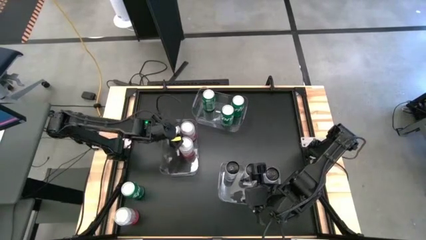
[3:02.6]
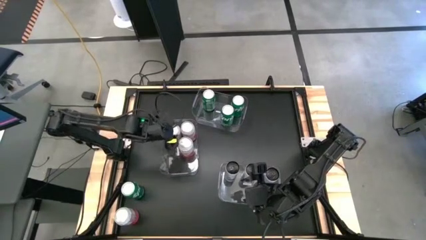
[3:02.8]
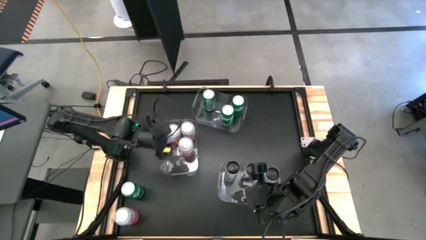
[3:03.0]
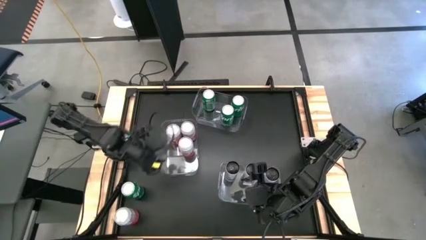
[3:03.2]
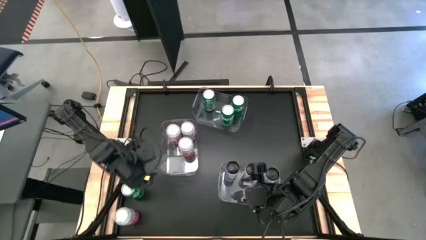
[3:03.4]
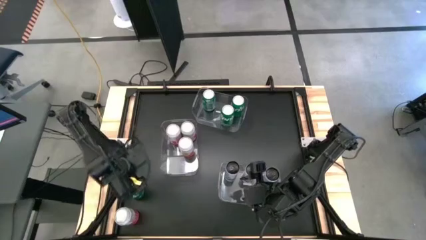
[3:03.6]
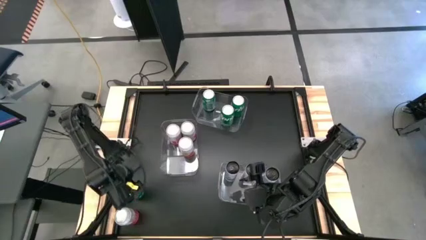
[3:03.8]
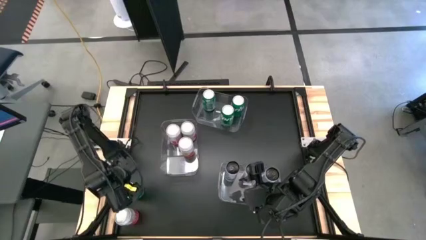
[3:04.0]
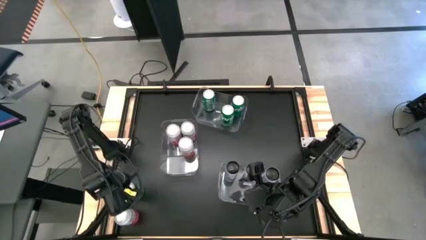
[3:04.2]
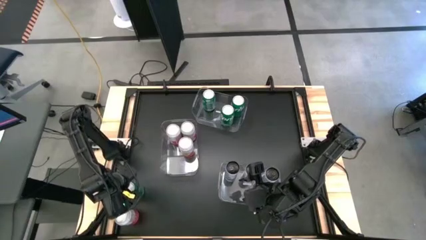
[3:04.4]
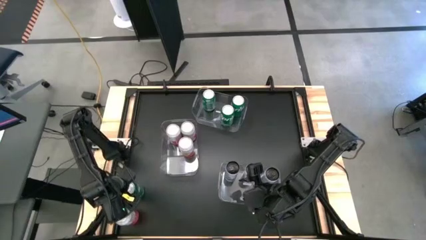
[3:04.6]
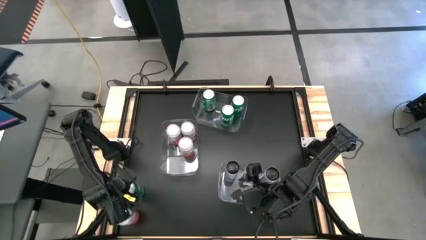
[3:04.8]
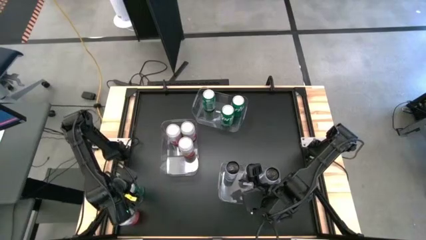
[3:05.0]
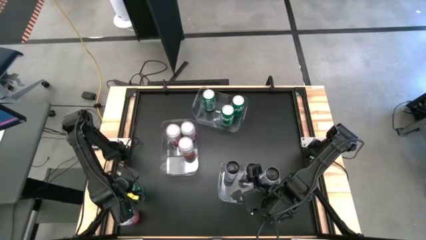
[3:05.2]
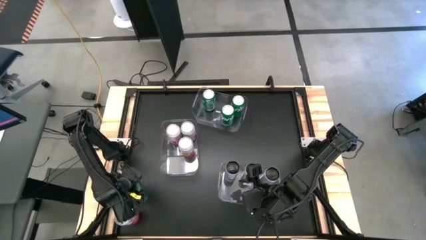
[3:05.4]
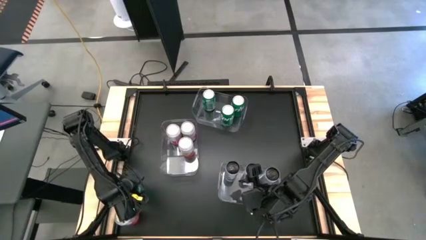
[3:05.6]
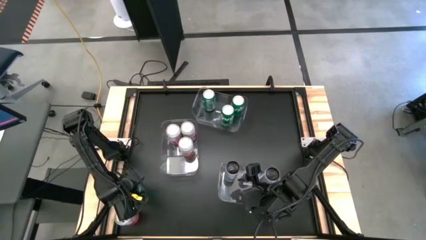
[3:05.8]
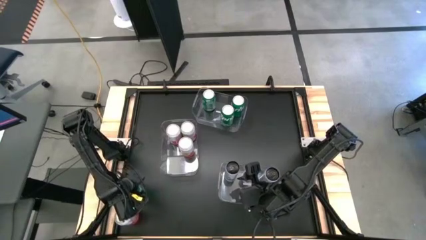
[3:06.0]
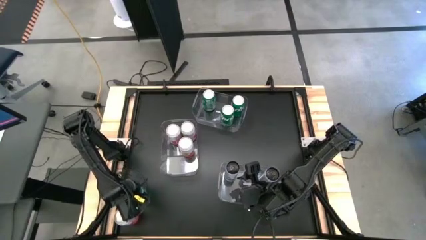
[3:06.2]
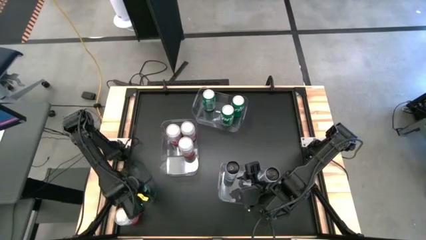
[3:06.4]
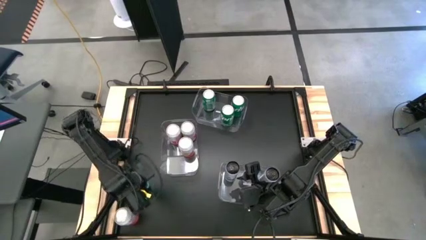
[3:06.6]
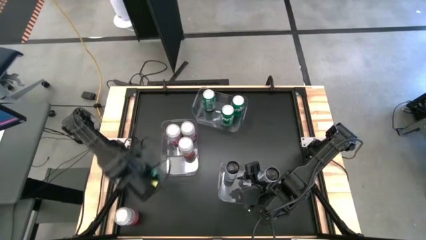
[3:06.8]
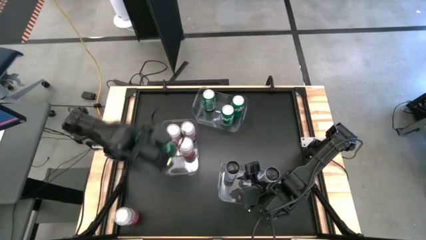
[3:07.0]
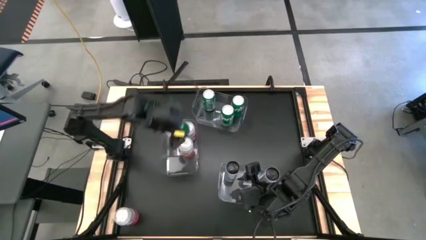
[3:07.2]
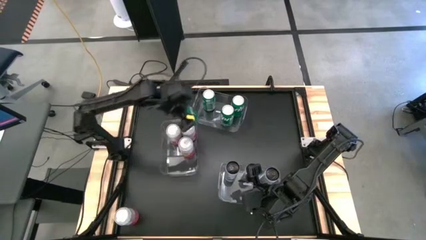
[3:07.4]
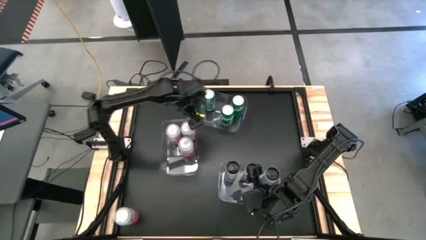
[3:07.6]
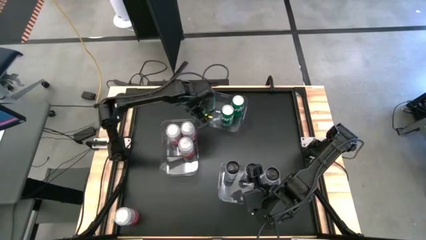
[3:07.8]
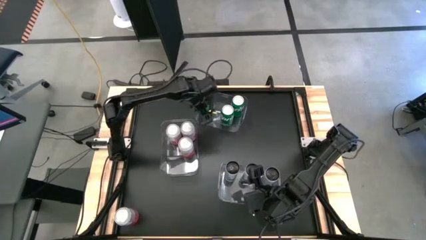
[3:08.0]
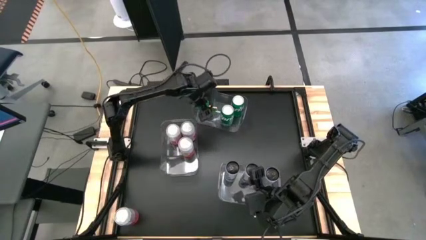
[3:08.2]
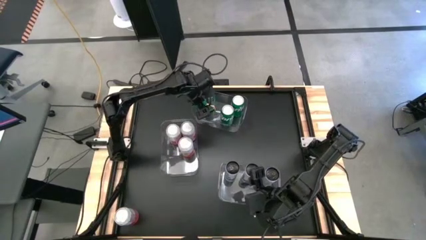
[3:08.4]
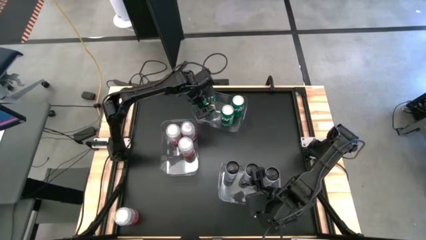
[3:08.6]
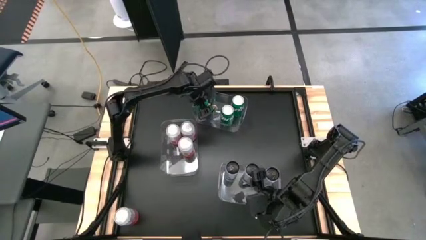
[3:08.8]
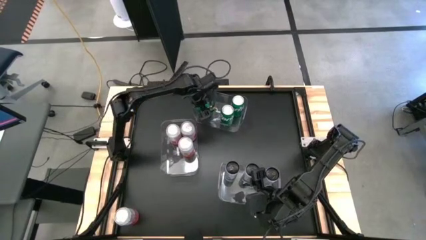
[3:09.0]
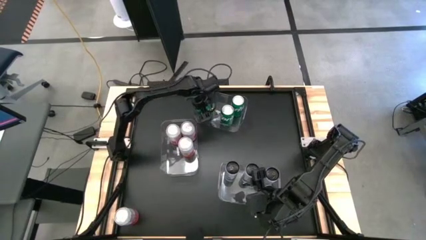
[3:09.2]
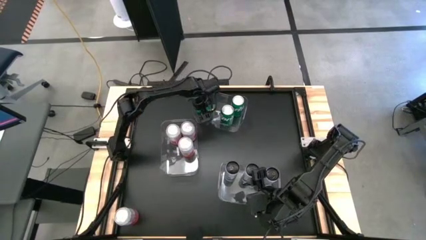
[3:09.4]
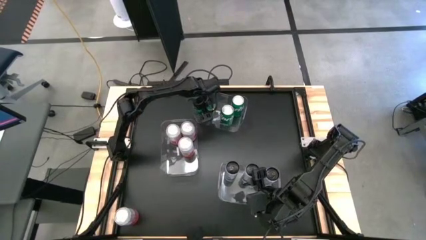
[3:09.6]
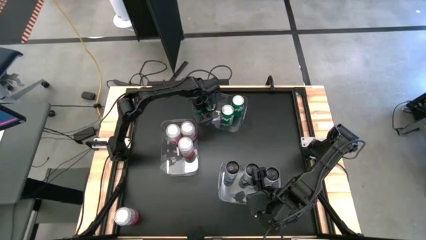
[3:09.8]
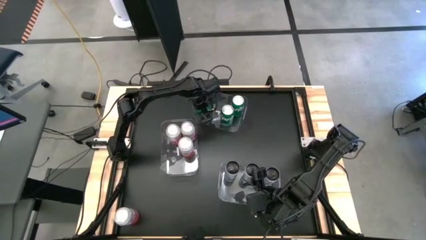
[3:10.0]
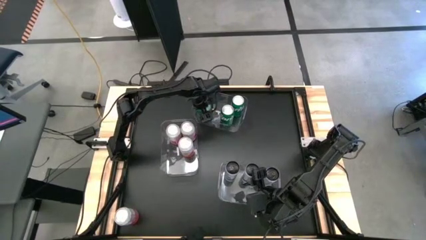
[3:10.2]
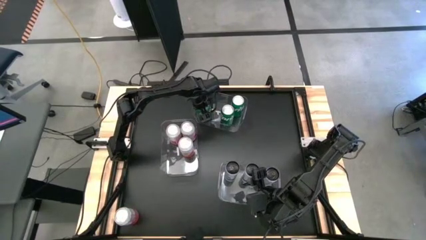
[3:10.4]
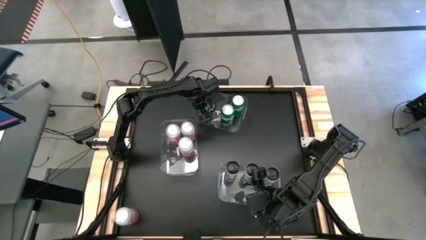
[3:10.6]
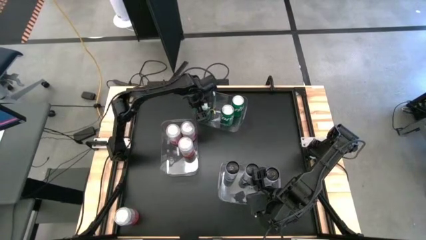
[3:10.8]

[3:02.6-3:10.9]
Task: Sort soda cans
Put the green soda can into the top transparent bin

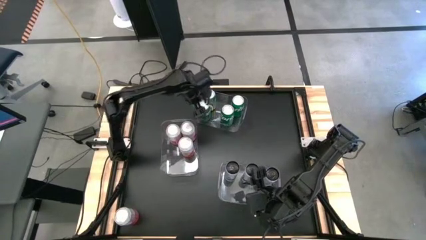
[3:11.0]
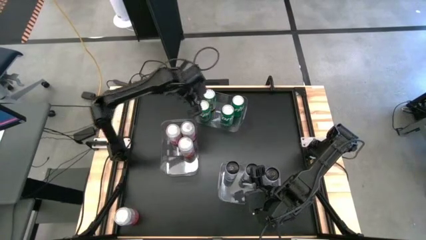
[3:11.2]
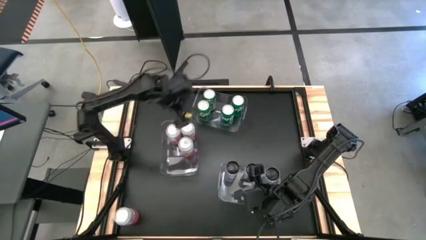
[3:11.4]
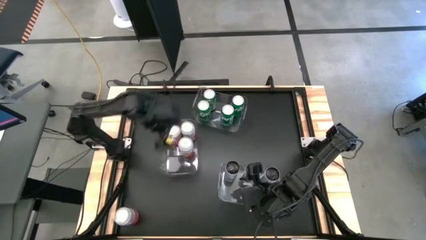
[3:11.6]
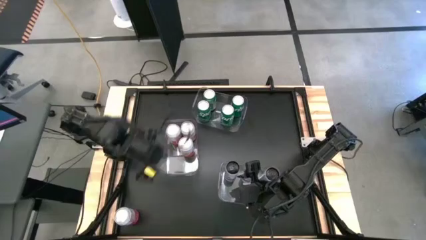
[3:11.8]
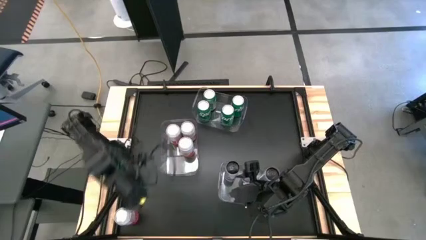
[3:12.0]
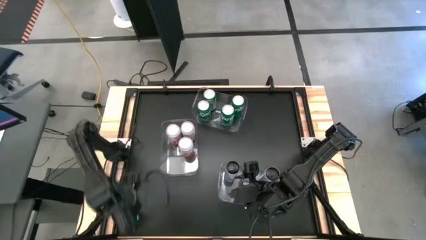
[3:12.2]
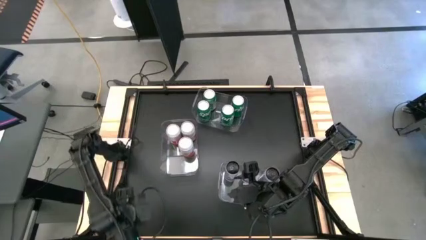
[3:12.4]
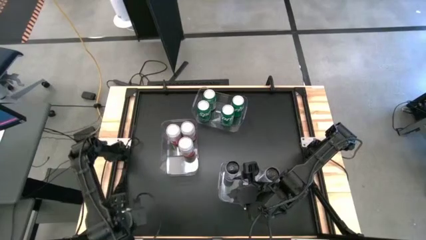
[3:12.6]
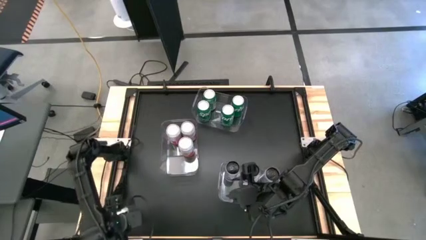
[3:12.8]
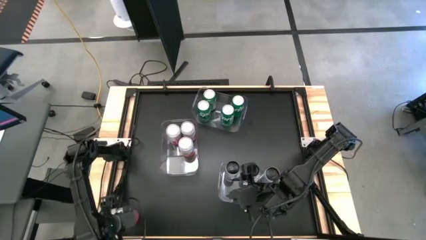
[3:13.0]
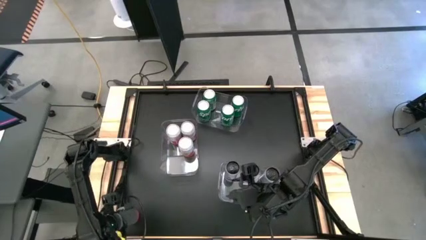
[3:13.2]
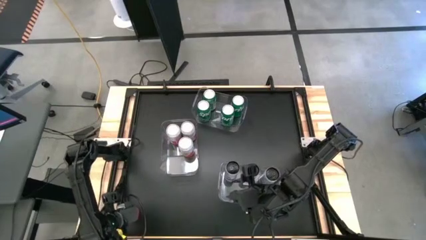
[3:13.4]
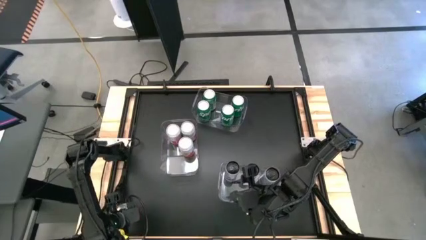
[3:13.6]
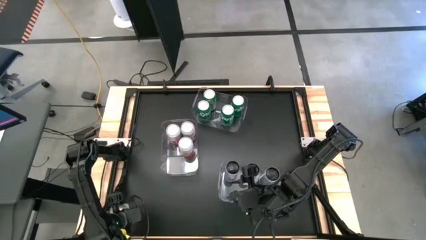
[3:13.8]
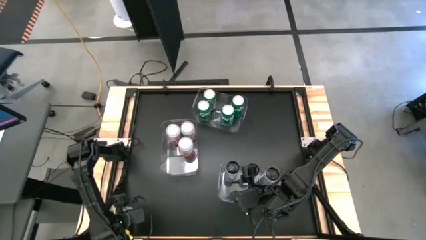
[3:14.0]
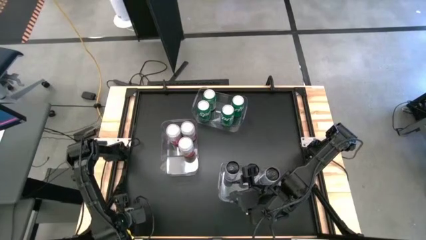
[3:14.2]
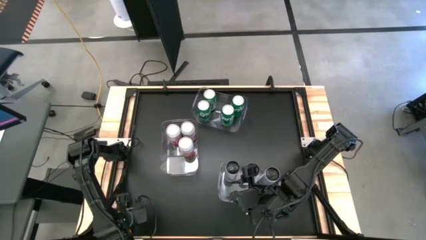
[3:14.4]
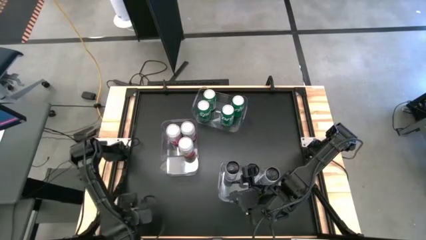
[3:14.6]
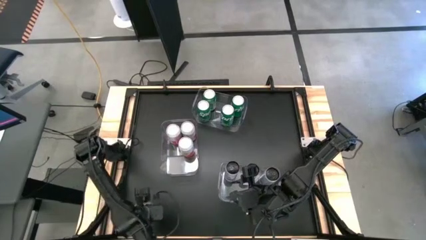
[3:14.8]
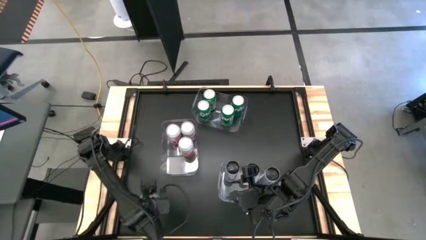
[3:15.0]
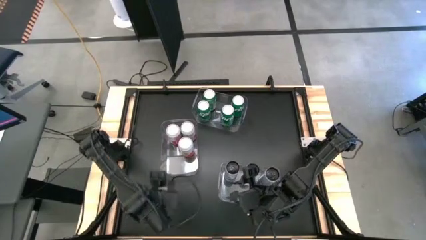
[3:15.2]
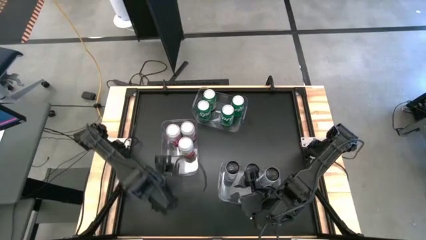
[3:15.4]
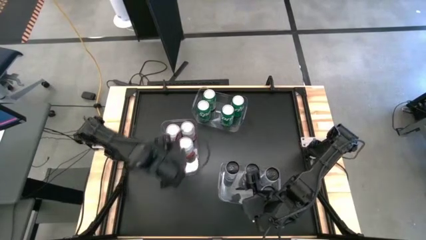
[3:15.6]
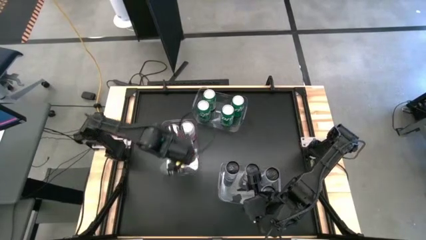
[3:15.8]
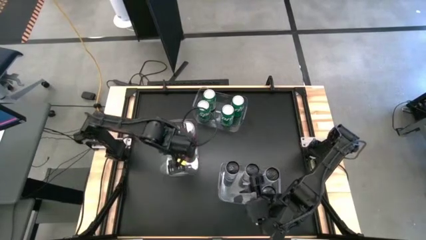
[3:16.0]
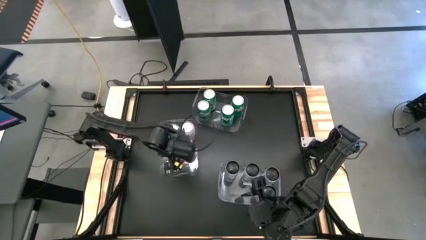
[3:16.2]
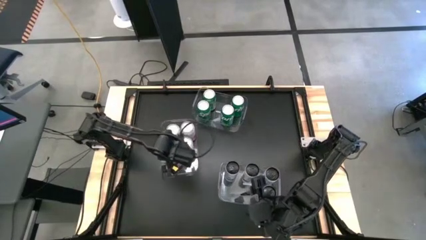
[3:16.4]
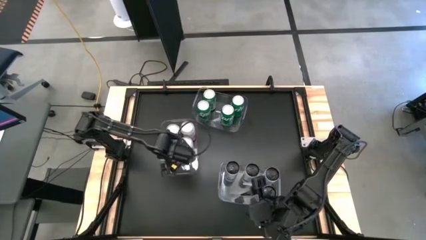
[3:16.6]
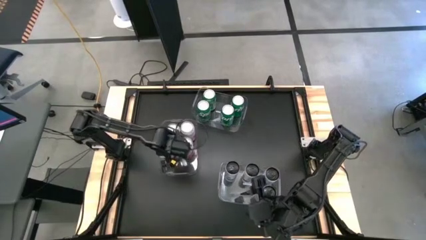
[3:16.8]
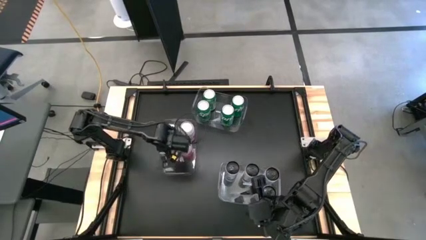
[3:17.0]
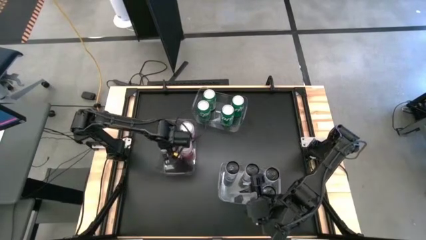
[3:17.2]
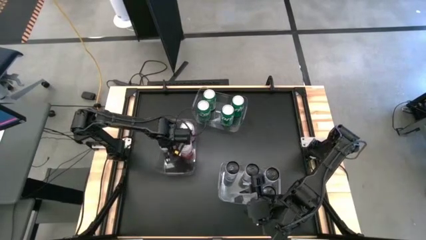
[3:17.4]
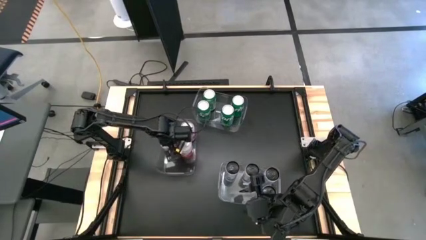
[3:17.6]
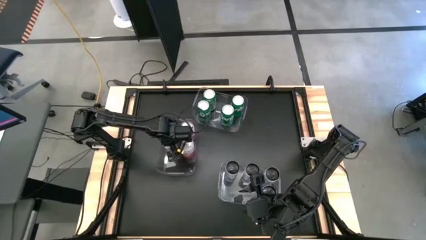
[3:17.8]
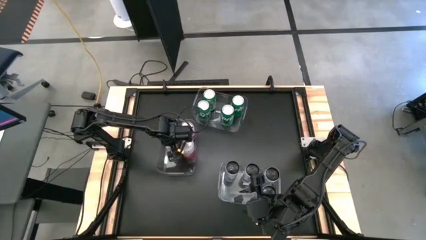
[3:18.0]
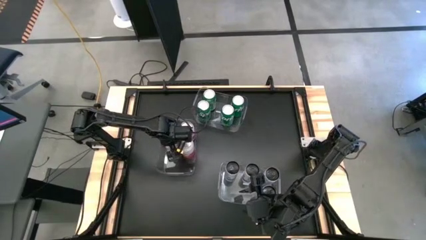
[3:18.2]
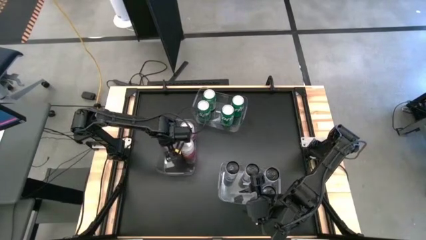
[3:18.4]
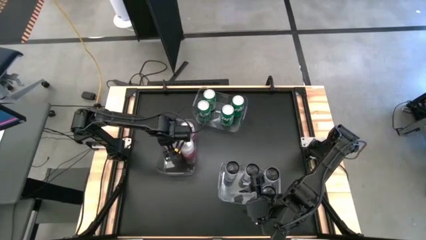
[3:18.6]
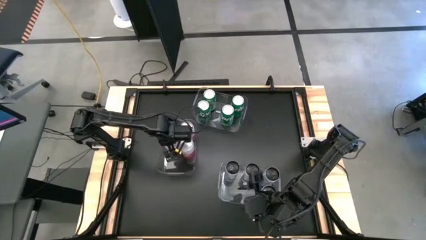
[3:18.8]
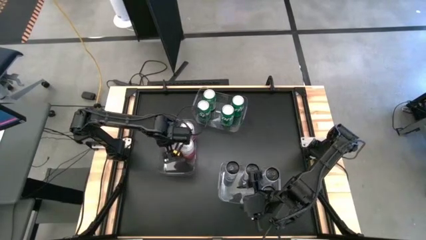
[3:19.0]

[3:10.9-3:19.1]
Put the pink soda can into the center transparent bin
